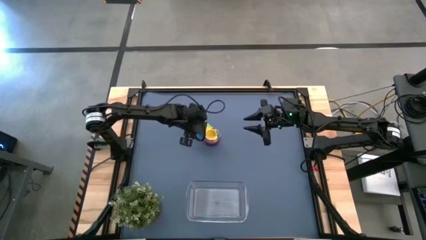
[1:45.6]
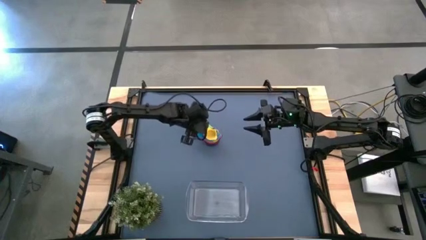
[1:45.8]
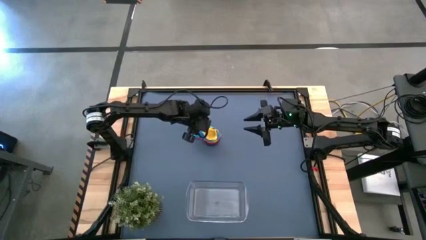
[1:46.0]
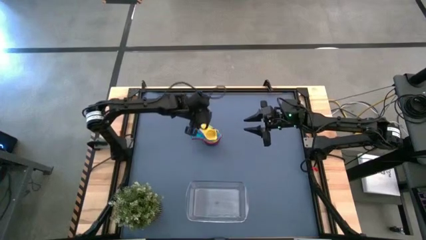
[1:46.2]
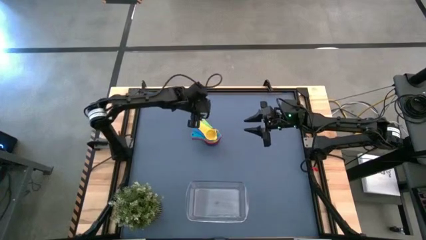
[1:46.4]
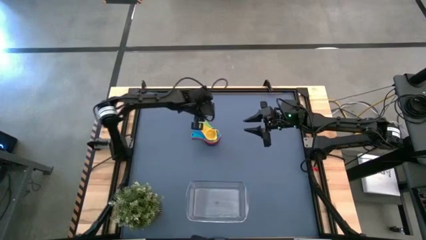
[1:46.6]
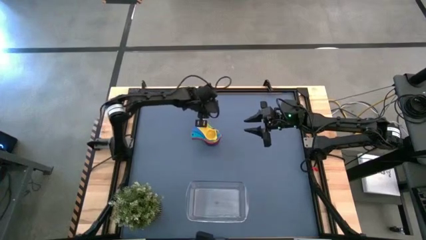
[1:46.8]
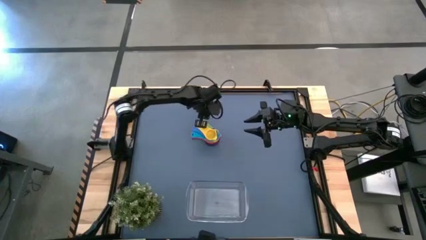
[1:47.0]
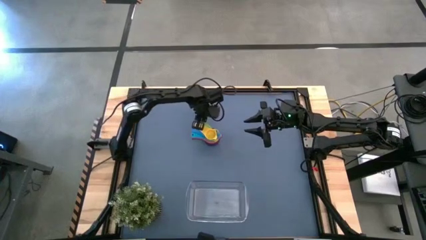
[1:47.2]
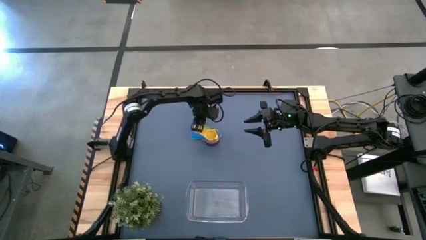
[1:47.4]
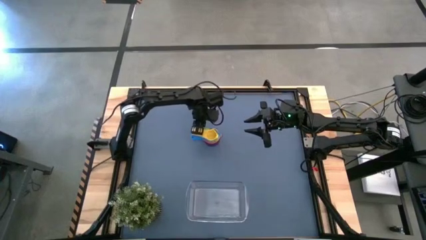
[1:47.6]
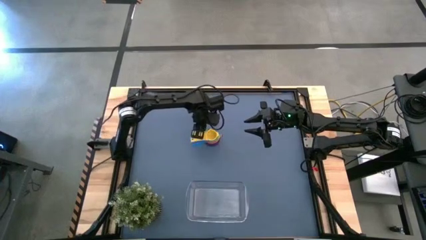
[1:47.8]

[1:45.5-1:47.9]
Task: Nest measuring cups in basket
Adjust the stacked measuring cups on the table

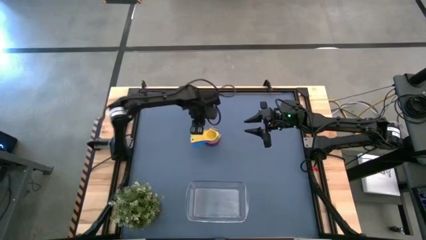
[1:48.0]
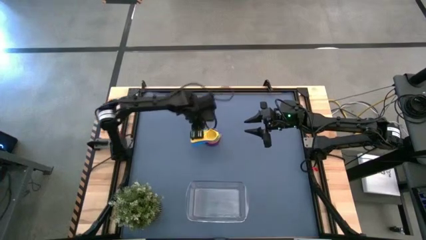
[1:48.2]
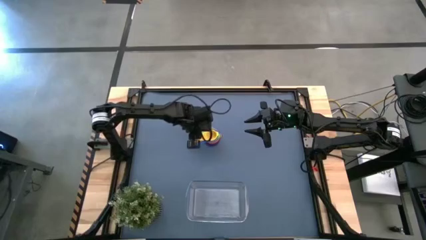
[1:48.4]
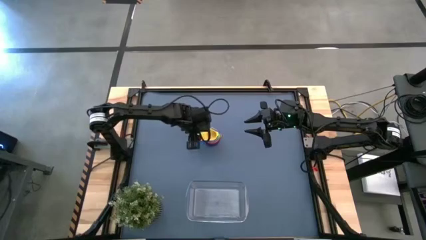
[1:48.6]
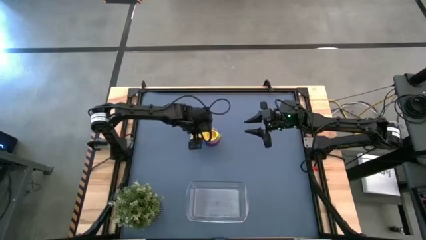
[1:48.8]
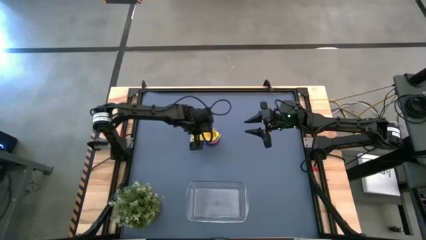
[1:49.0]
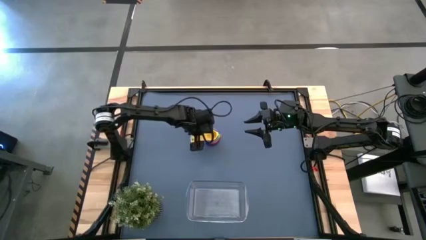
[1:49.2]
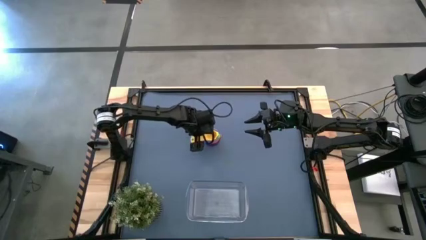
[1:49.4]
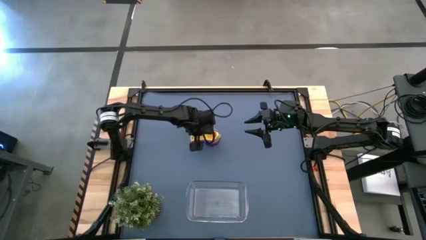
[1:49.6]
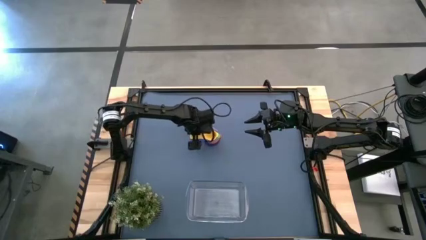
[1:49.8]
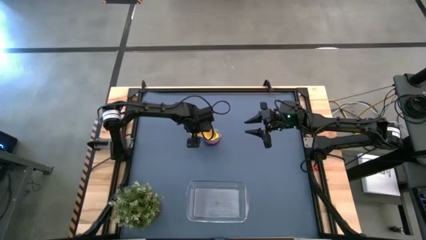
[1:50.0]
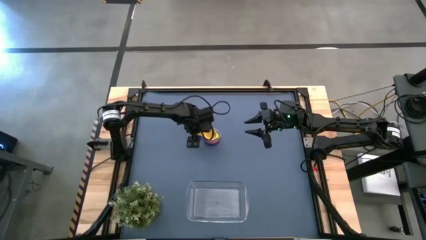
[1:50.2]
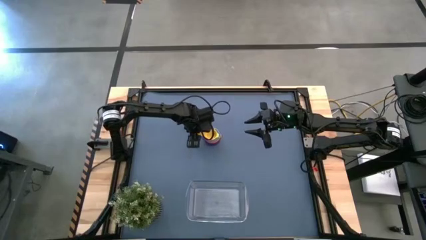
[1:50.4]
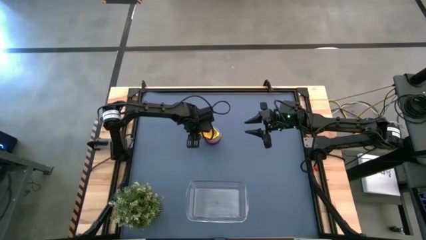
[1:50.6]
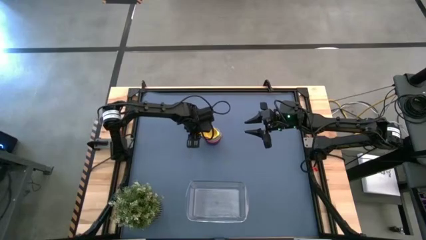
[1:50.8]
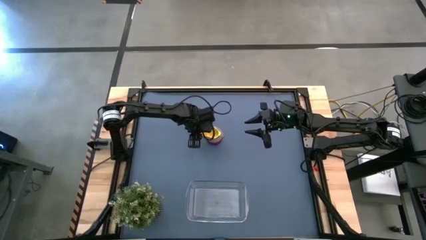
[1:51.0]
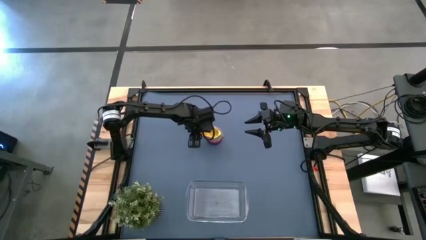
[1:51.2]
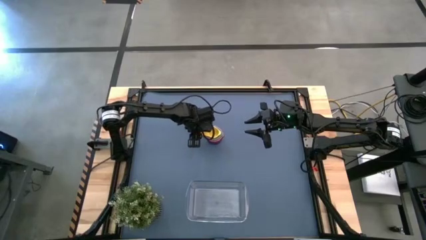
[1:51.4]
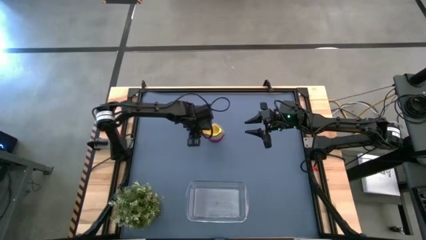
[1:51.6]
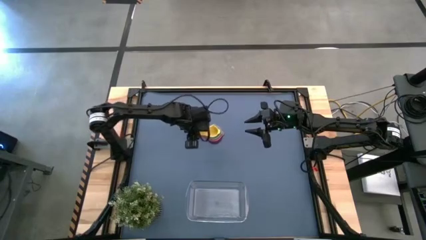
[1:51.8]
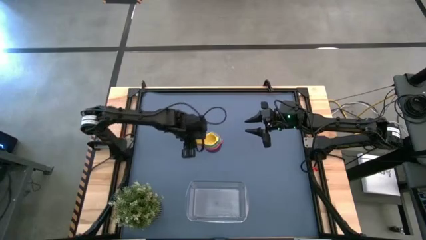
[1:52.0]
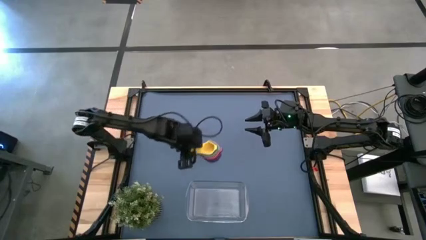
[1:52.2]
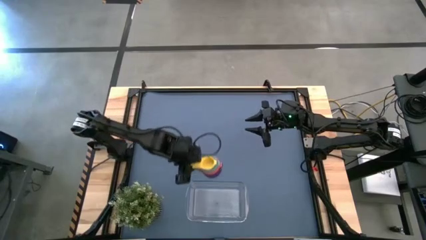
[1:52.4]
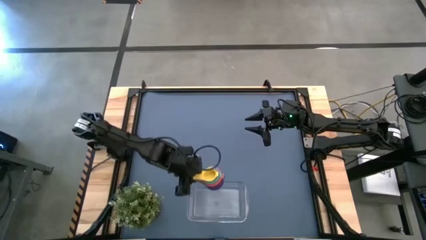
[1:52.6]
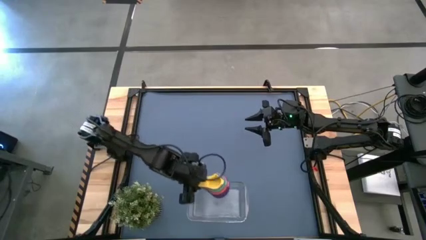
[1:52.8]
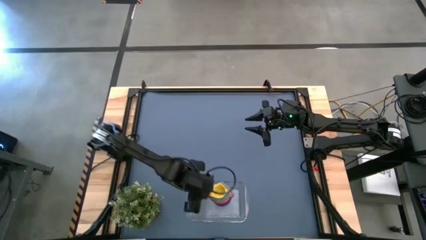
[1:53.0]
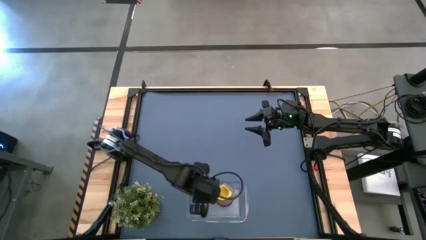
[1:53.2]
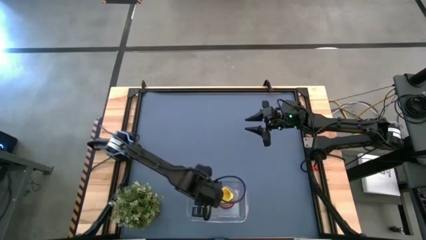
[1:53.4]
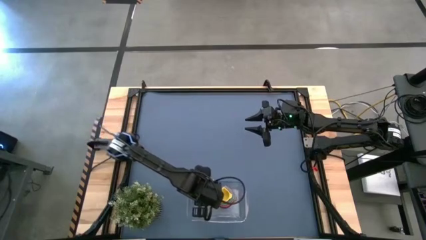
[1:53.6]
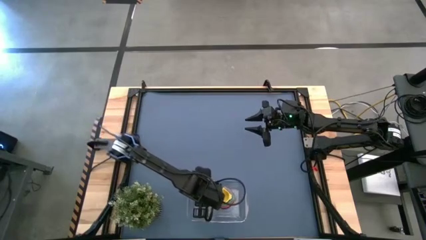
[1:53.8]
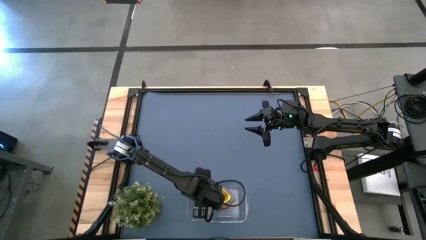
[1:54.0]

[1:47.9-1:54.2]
Put the stacked measuring cups into the transparent bin

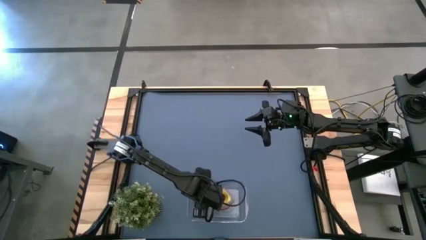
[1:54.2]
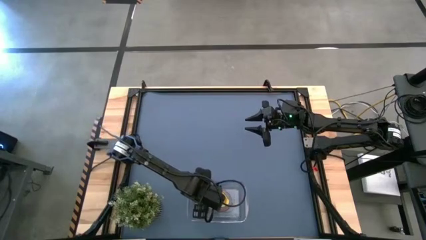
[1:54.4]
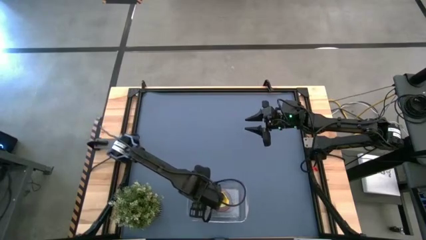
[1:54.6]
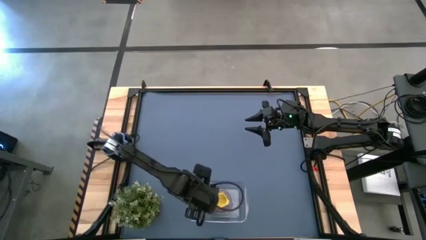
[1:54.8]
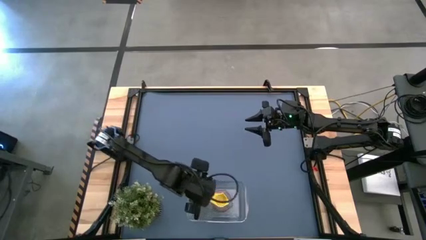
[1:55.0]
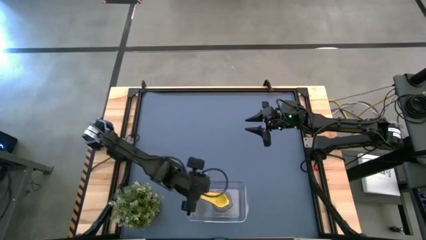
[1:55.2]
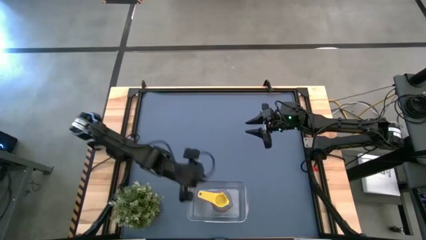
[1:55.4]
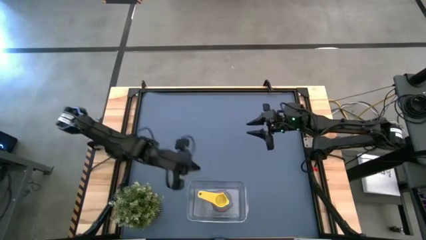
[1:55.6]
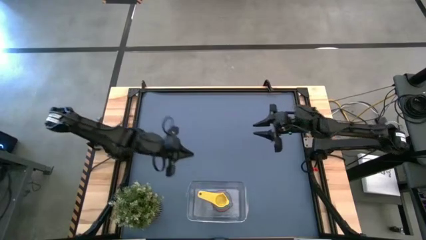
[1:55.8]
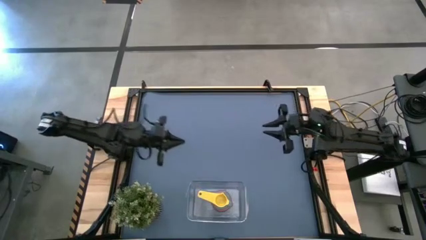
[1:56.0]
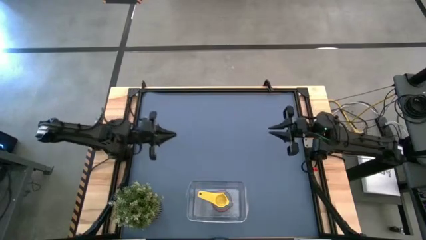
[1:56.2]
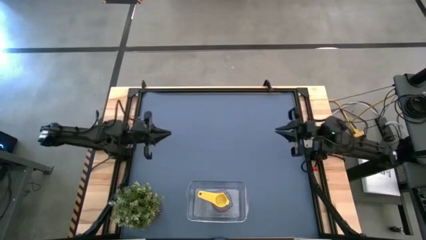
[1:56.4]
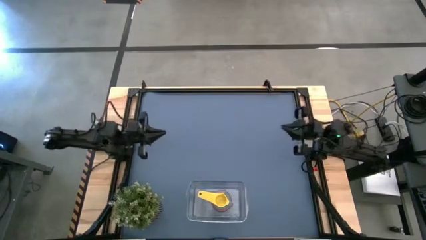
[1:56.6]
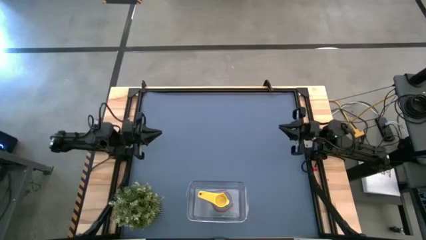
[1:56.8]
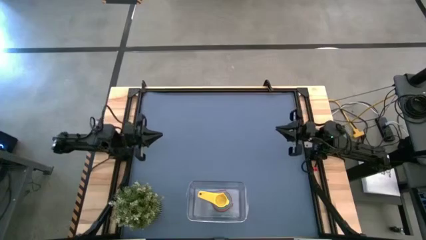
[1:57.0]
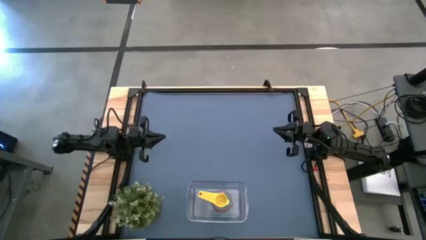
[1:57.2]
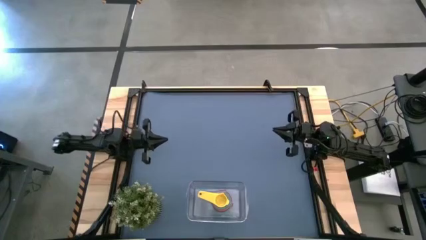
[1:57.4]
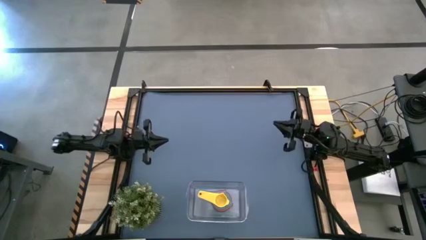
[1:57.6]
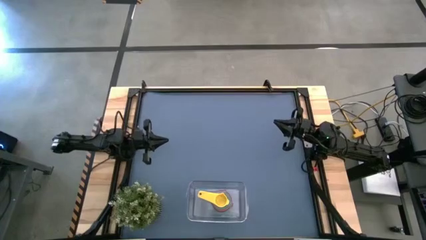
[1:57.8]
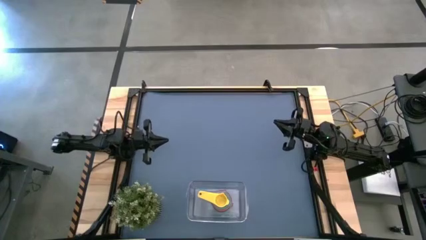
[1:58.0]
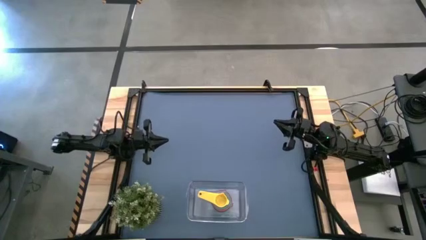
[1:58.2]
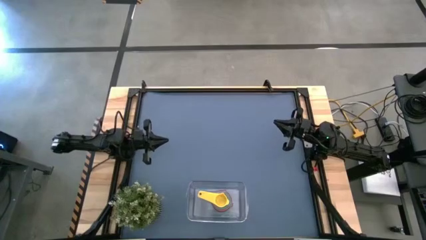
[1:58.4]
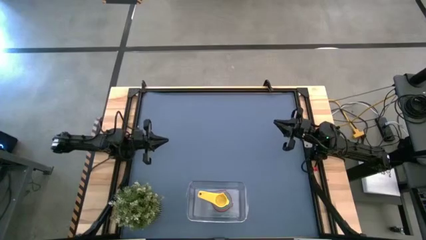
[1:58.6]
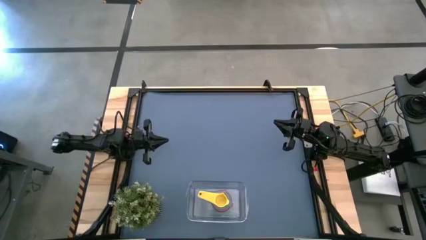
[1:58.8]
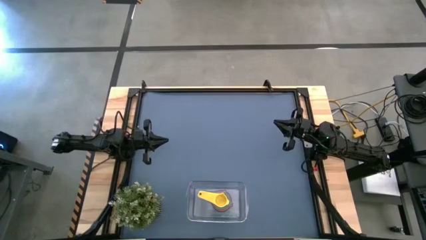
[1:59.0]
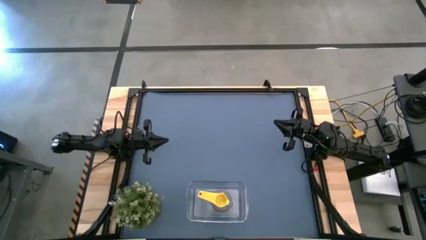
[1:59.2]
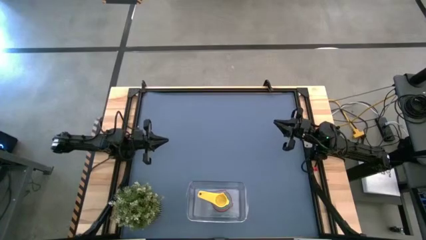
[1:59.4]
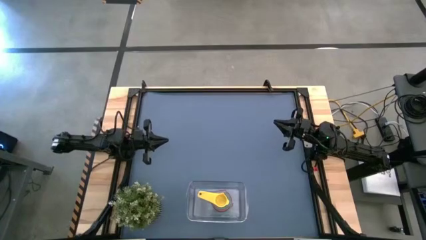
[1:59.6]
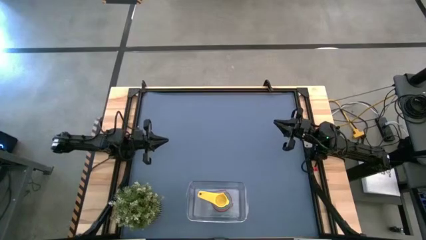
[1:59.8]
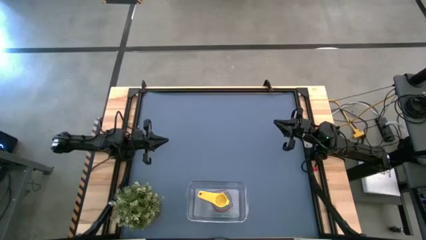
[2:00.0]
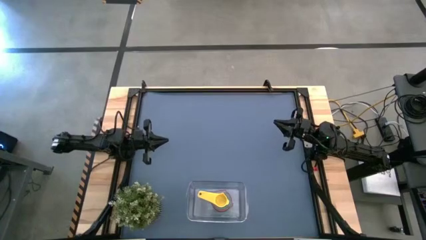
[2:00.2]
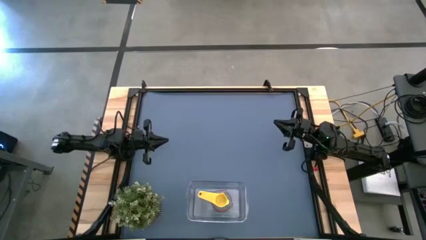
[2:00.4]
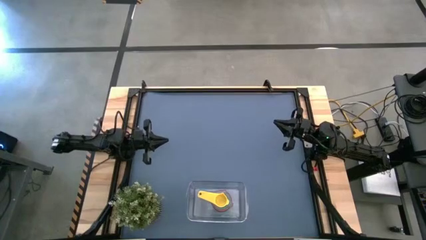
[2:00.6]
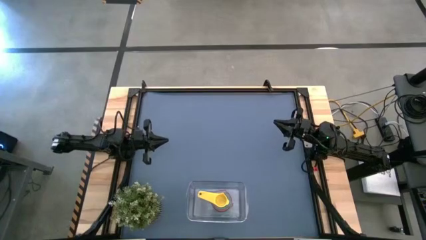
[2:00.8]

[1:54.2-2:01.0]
Return to Home Position

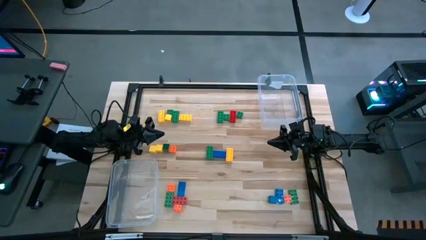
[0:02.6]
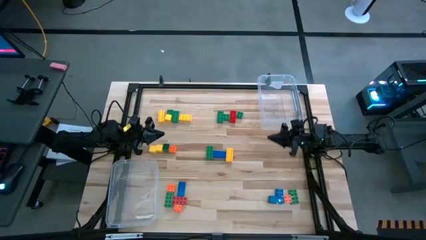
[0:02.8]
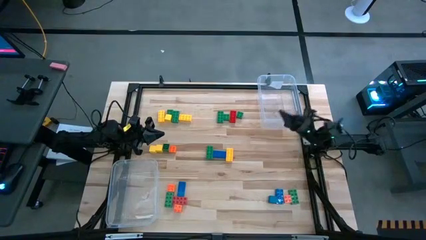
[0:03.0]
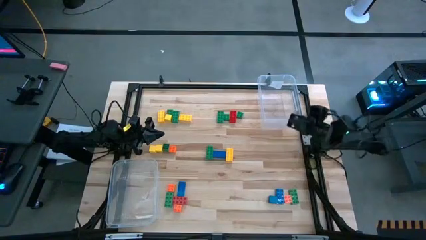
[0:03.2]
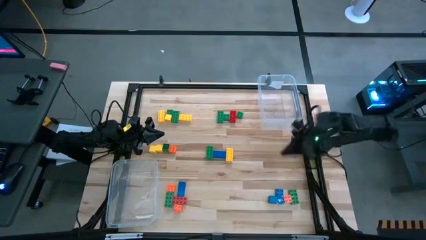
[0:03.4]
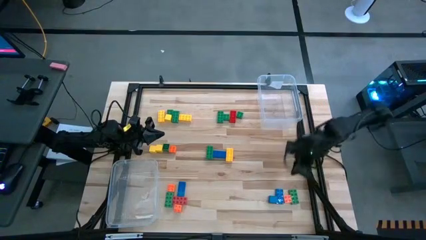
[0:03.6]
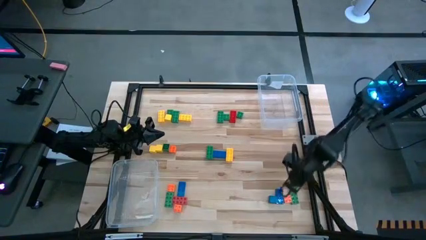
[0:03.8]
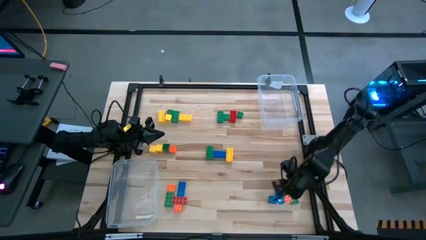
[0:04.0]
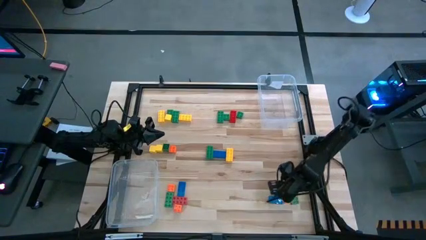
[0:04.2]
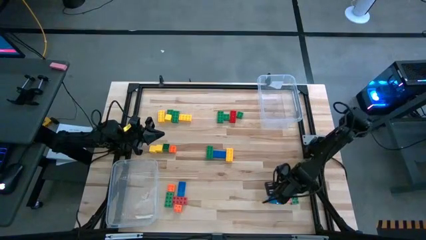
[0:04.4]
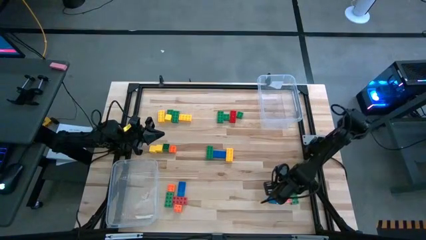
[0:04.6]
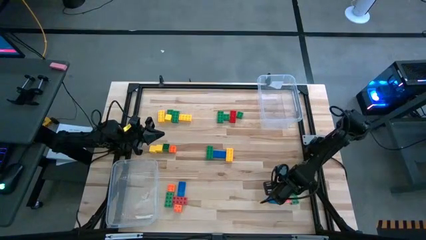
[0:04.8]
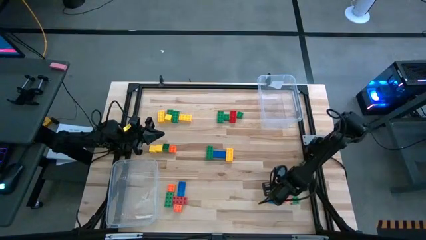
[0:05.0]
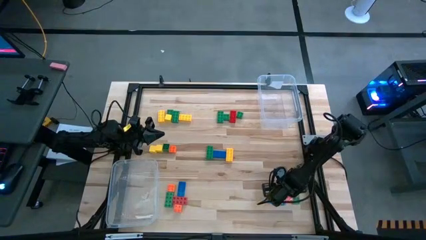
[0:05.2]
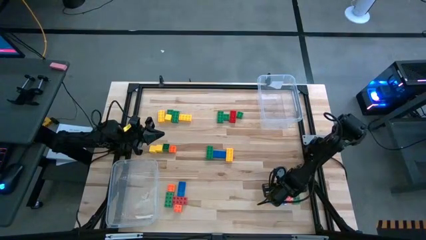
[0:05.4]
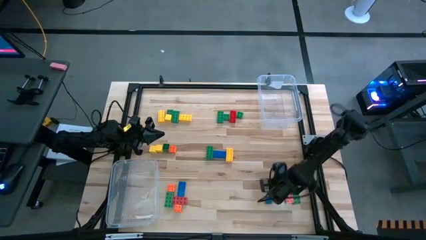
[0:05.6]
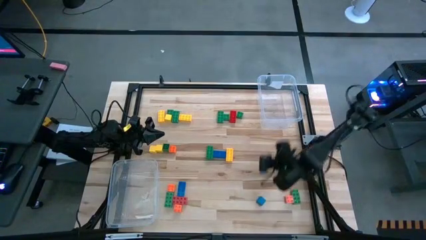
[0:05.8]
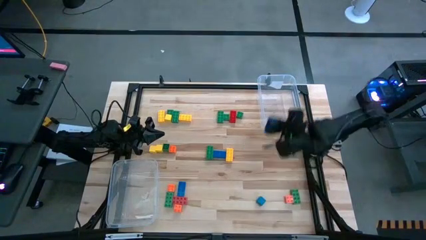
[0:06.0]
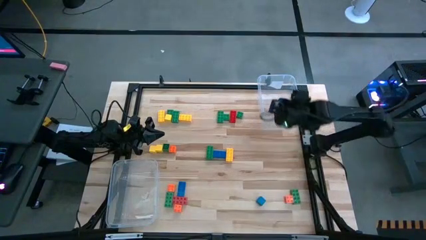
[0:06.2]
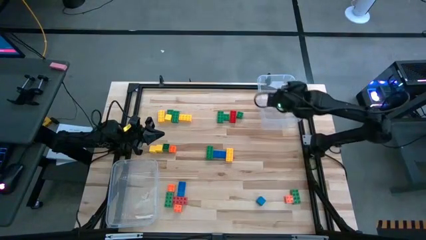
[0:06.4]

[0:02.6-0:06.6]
Task: Sort blocks by size
Put the bottom right large blue game piece into the right transparent bin
